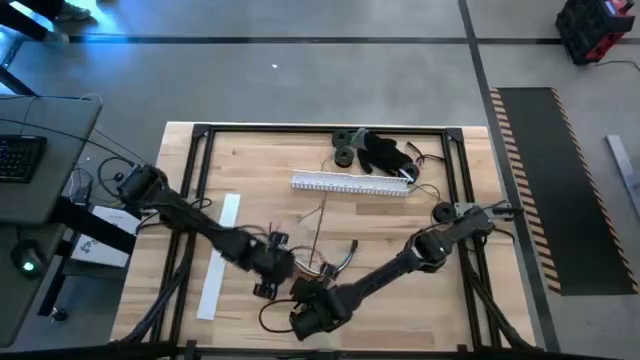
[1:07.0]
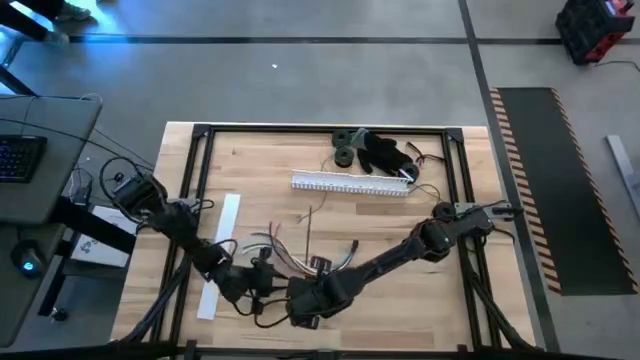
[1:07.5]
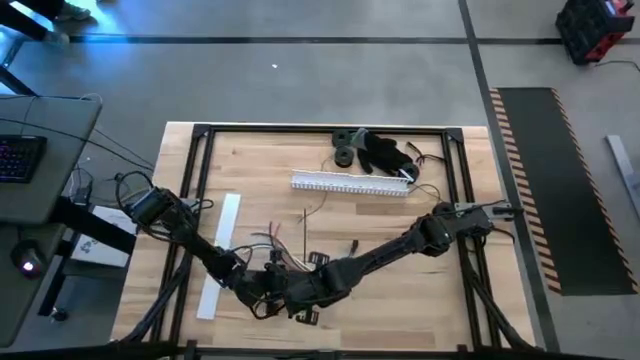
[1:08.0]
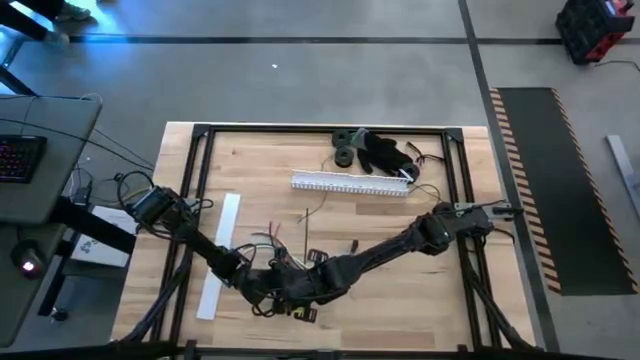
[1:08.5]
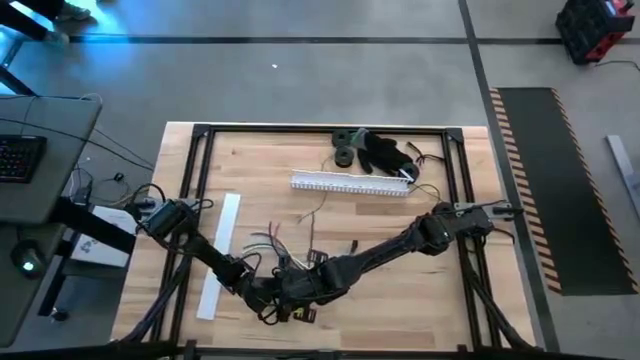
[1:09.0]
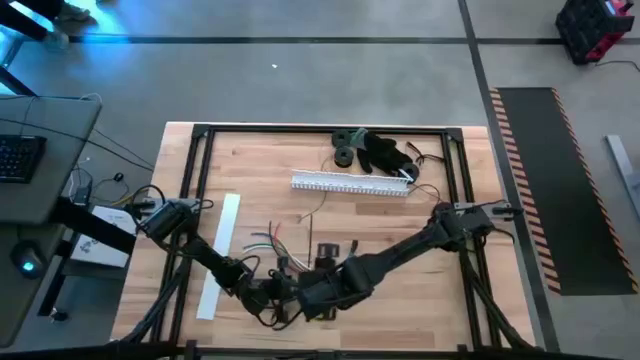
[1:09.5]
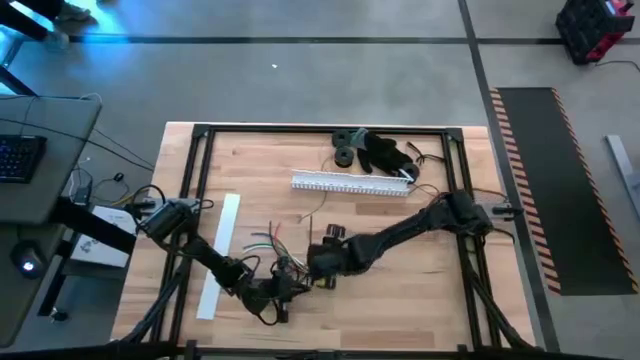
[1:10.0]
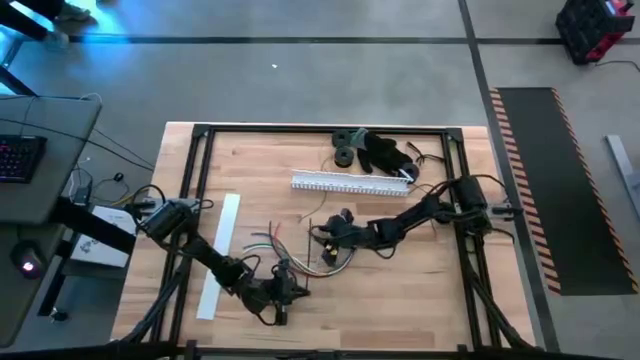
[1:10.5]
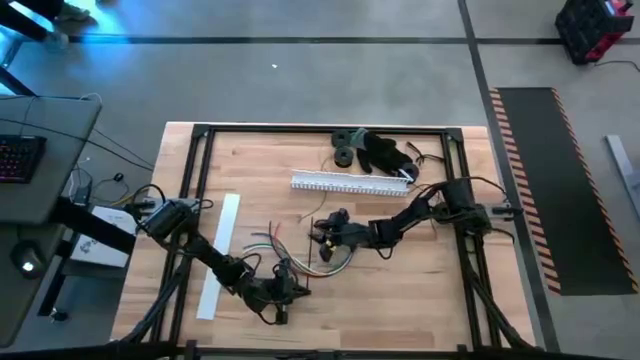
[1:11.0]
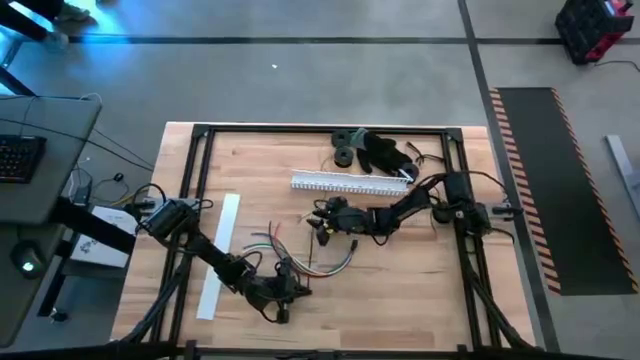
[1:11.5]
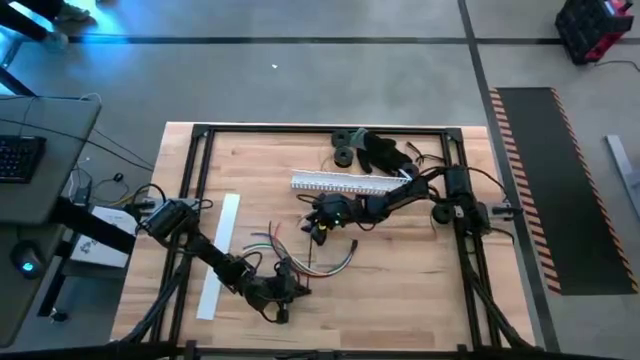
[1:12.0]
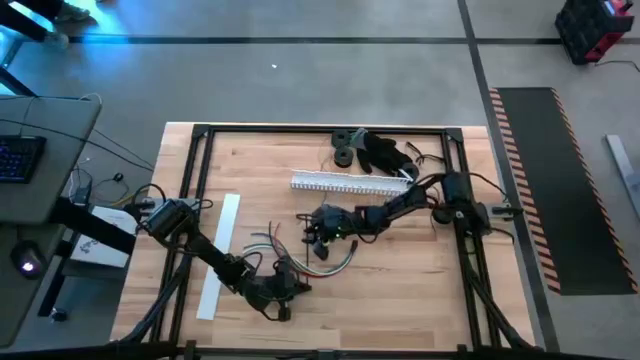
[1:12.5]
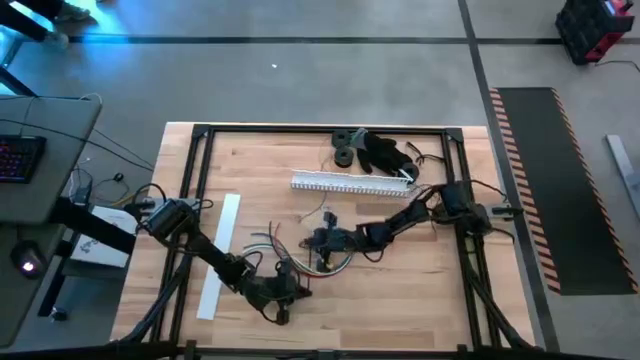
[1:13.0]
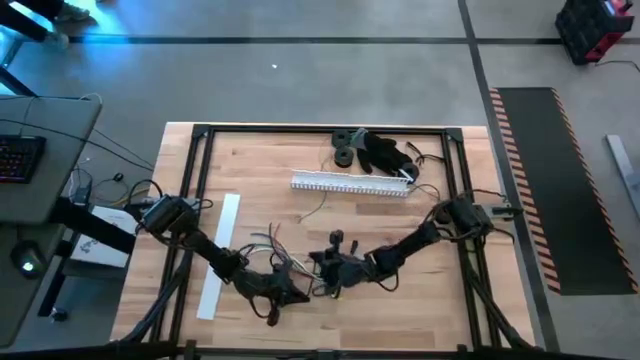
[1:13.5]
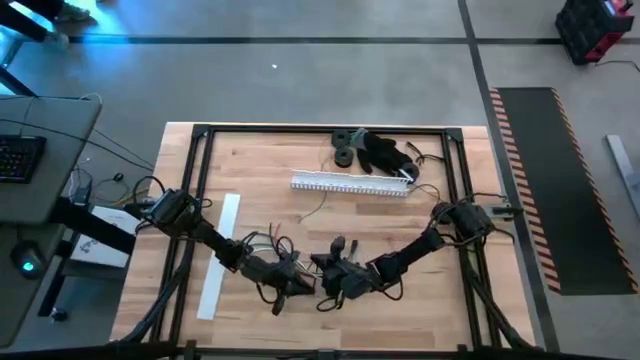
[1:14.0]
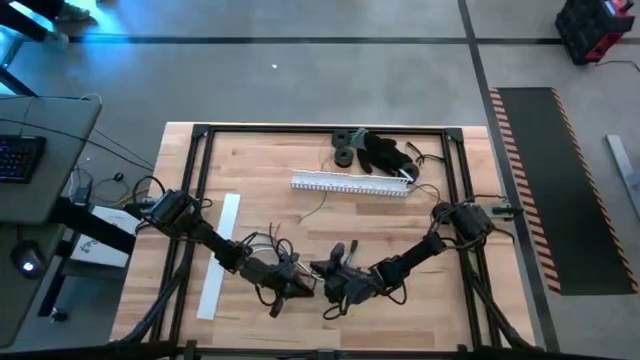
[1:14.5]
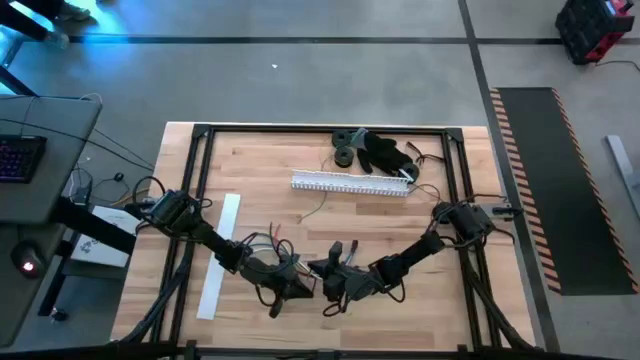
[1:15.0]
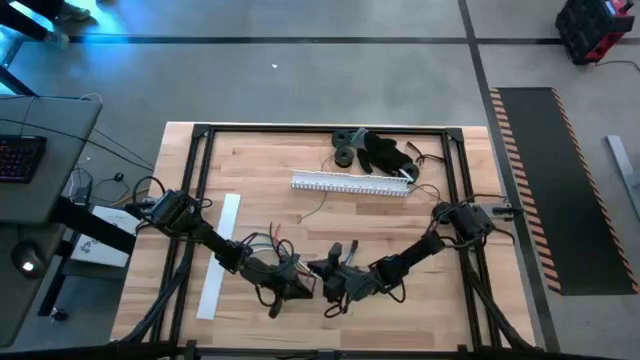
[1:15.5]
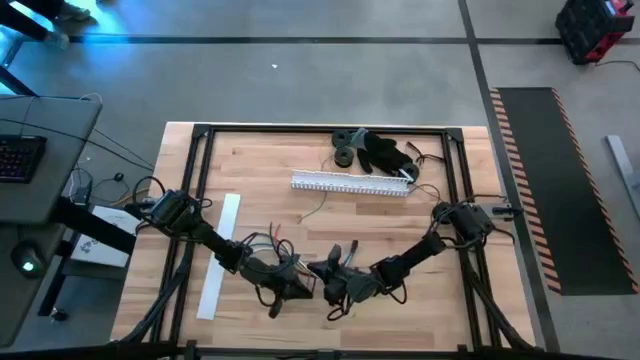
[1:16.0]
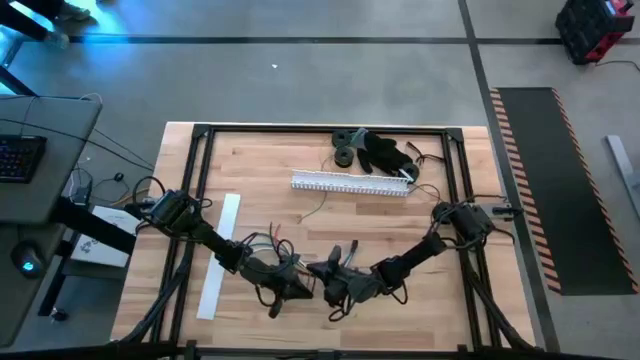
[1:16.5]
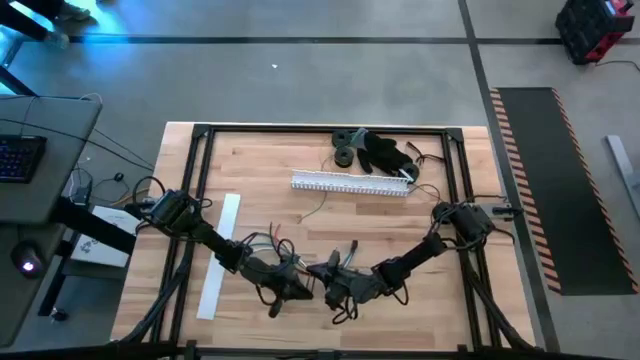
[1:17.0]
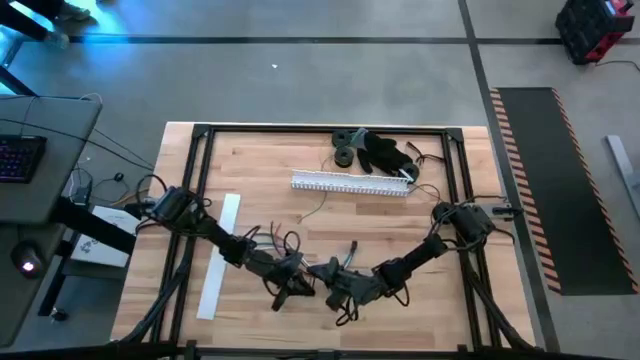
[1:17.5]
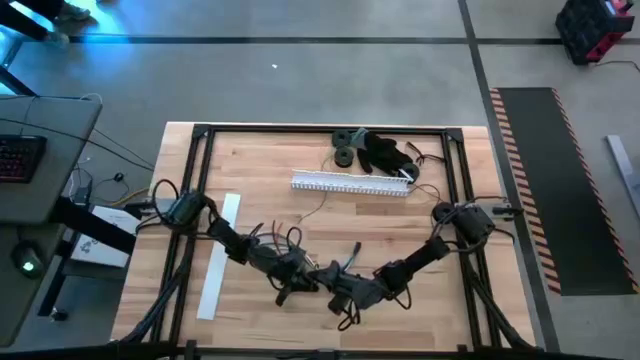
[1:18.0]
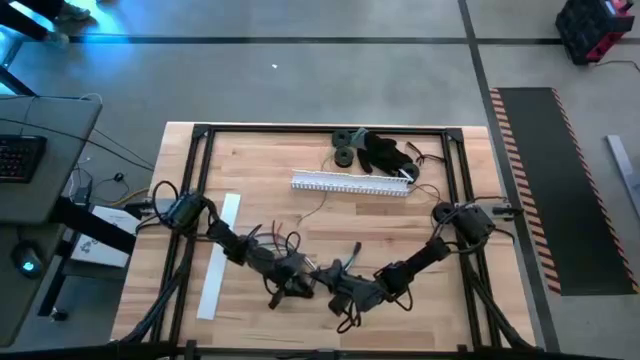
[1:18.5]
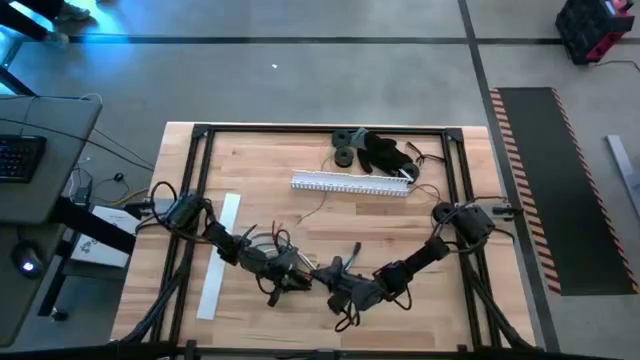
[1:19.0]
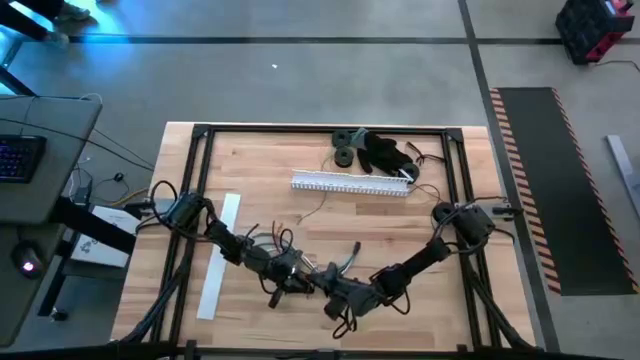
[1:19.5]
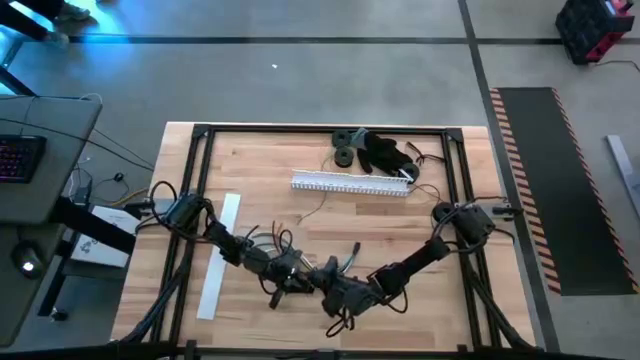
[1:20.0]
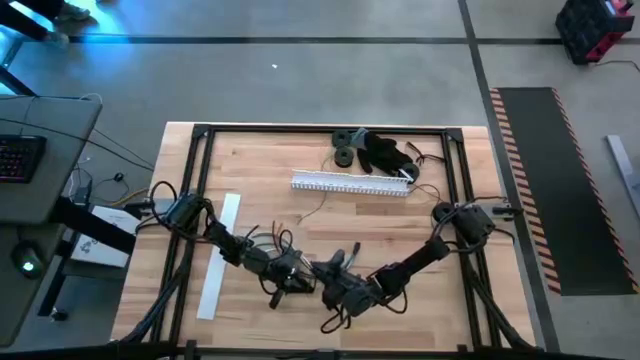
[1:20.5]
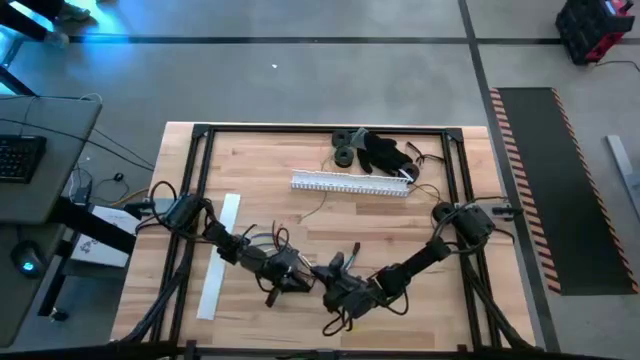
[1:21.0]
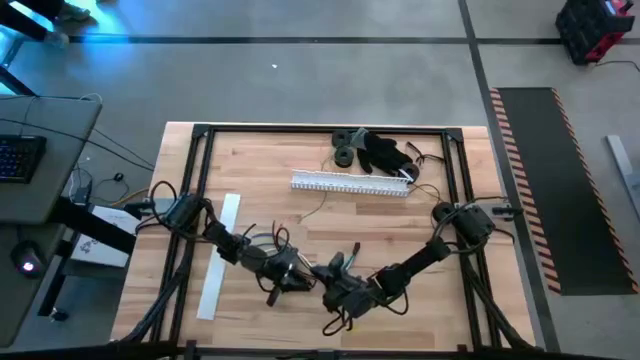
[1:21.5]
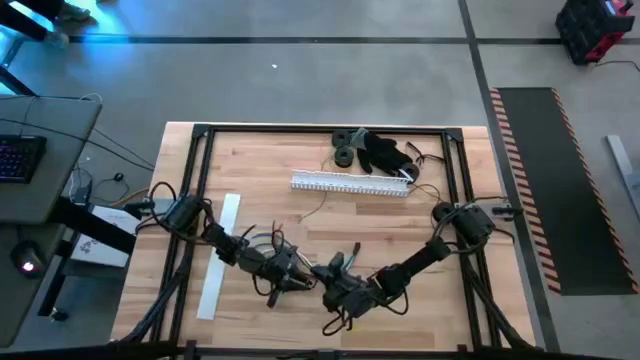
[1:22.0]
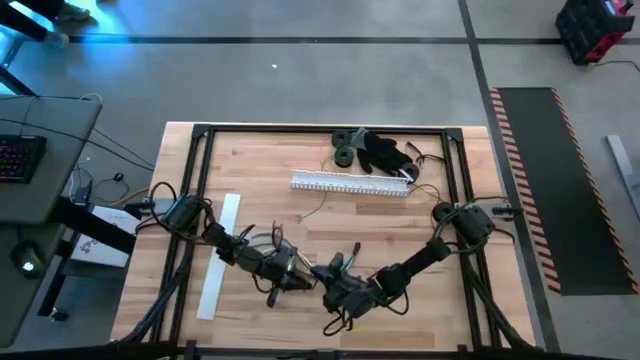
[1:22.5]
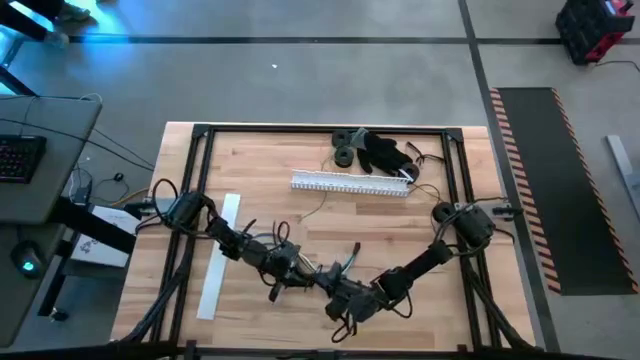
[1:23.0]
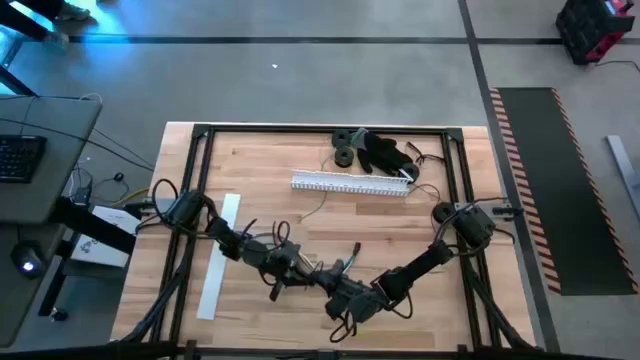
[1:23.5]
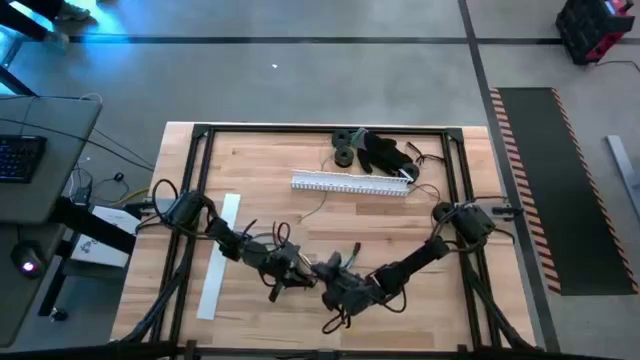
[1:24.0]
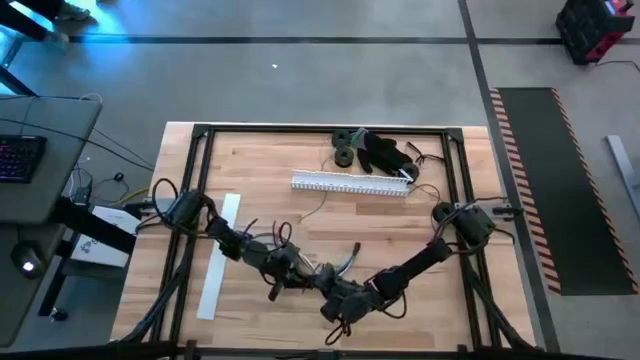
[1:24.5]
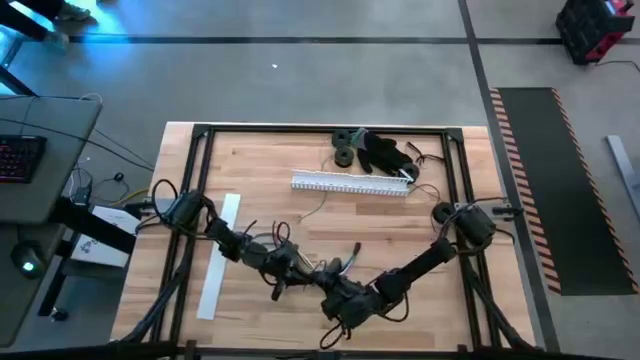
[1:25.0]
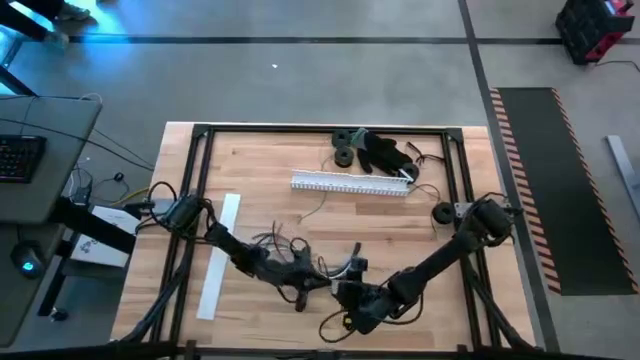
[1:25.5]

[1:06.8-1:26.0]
Task: Ziptie cables
Wrap the cable wire using a black zip tie

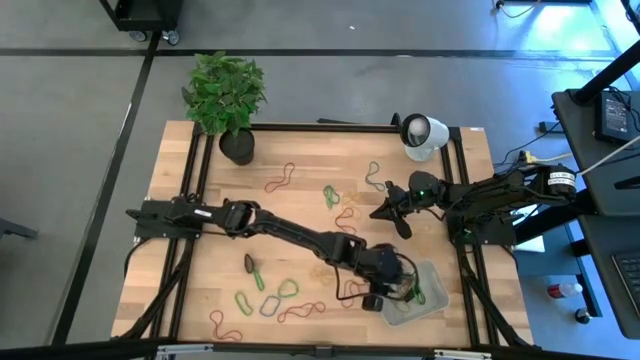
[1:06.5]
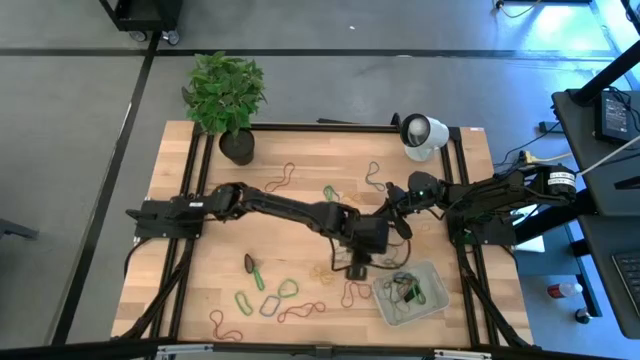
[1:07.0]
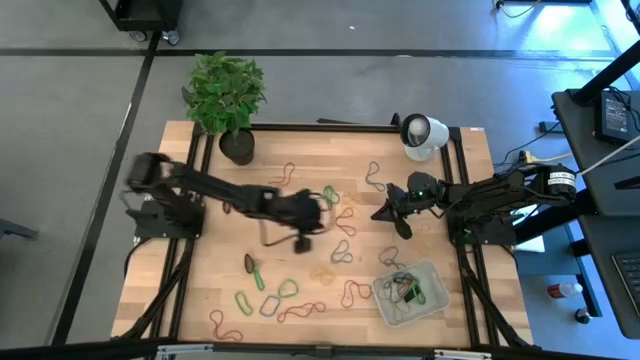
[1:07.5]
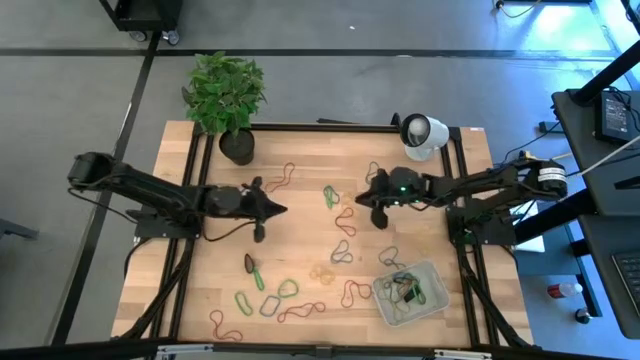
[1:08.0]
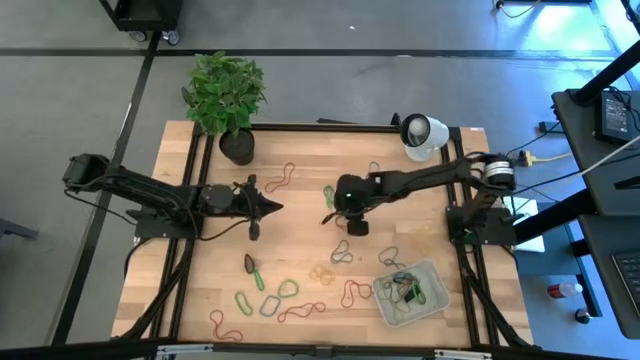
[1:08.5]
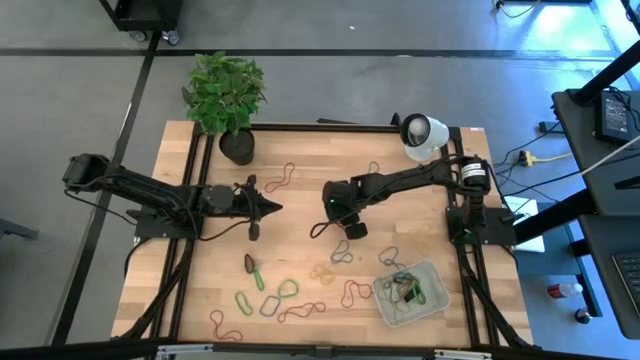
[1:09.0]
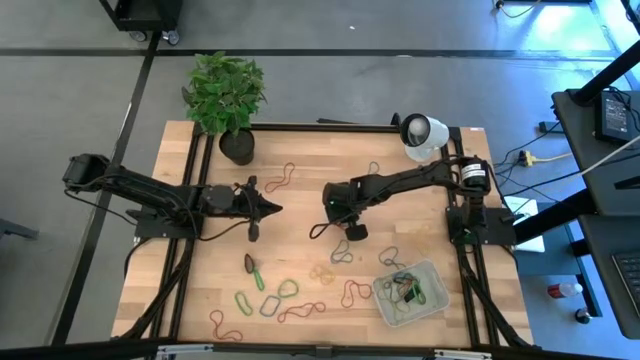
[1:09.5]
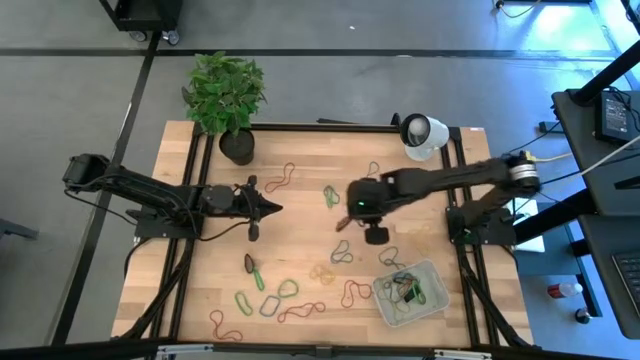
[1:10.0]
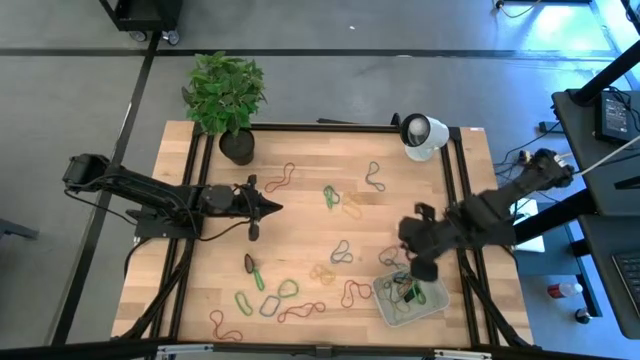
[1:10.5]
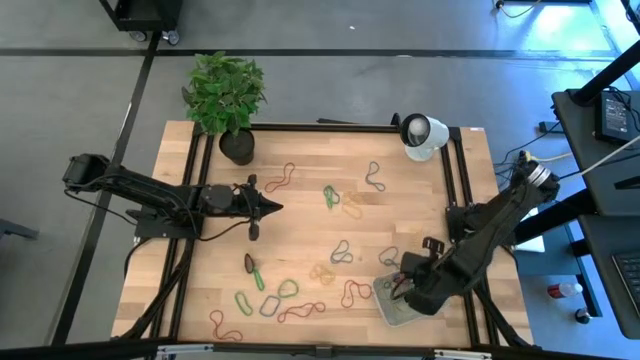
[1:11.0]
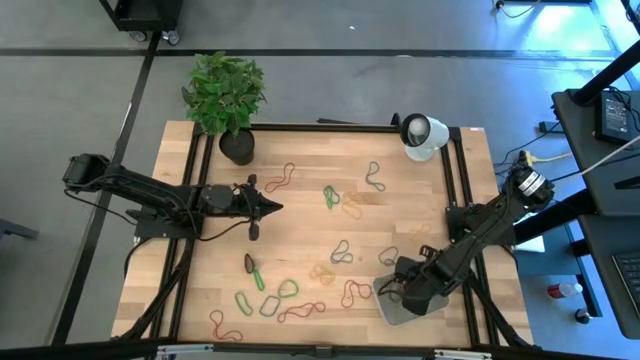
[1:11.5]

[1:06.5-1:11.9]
Task: Pick and place rubber bands into bin
Put the red rubber band into the white bin
